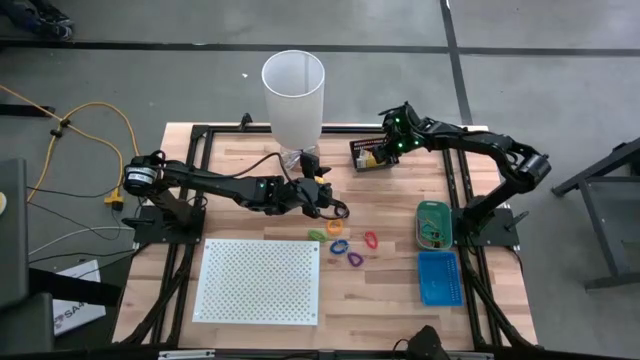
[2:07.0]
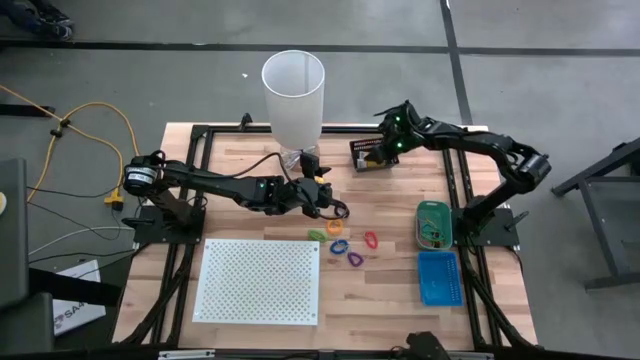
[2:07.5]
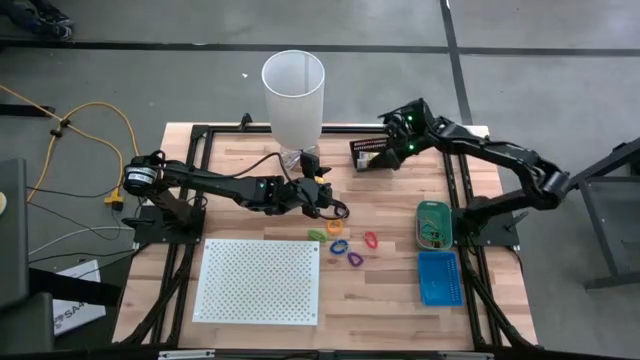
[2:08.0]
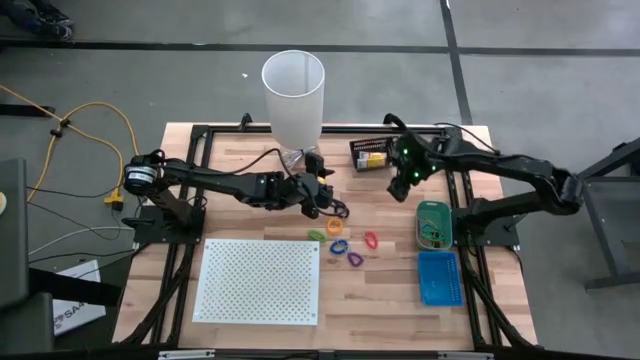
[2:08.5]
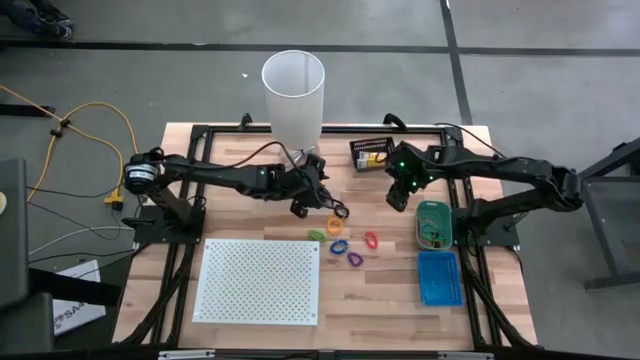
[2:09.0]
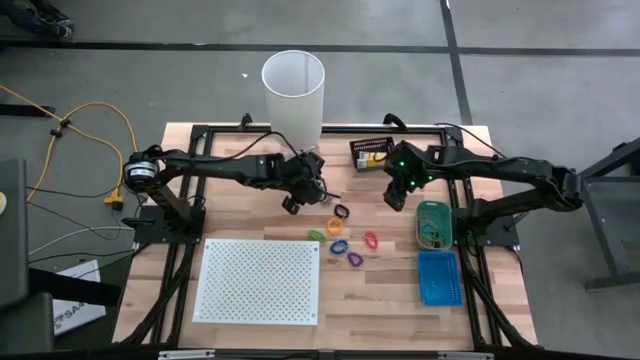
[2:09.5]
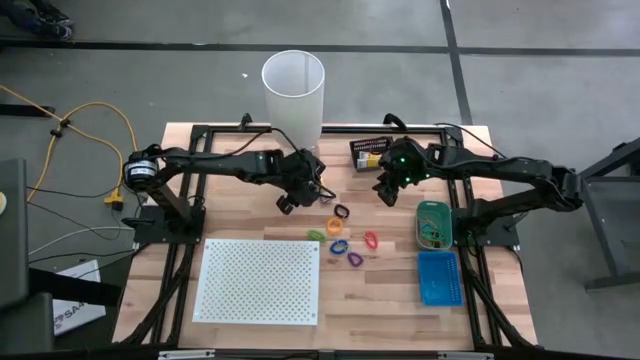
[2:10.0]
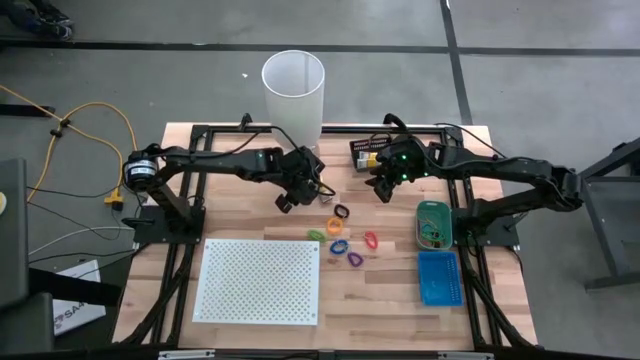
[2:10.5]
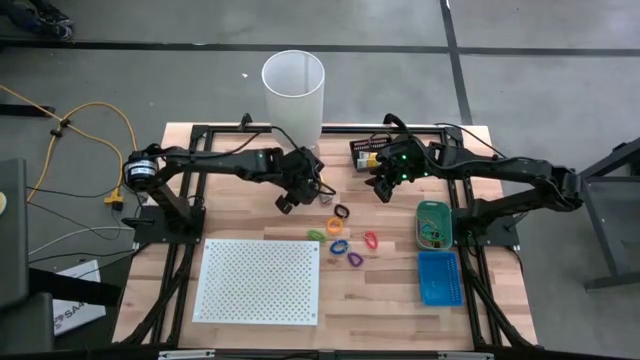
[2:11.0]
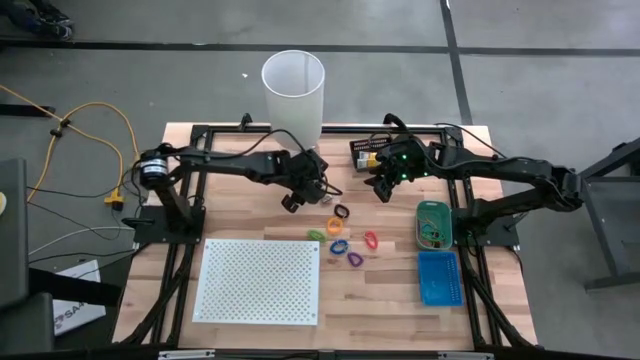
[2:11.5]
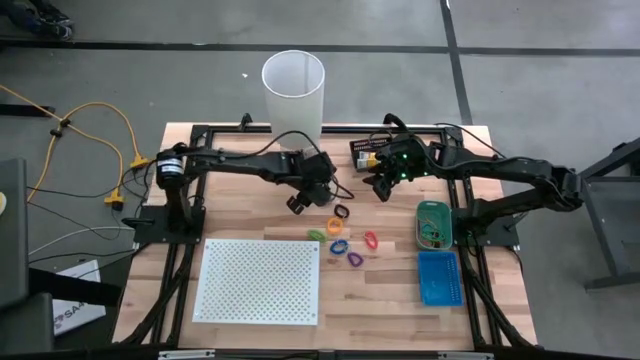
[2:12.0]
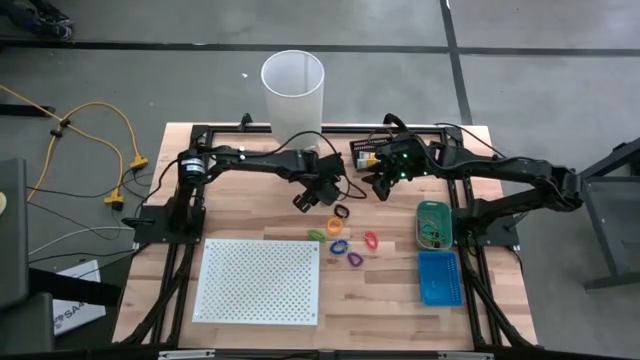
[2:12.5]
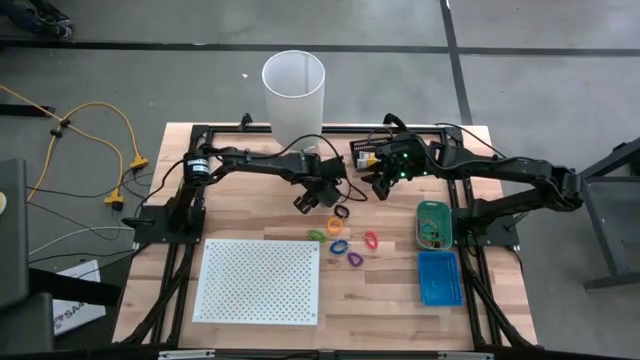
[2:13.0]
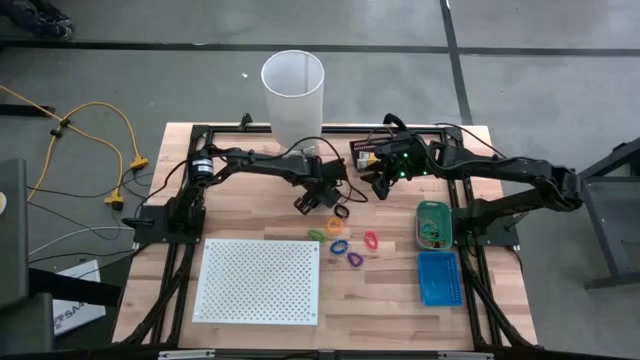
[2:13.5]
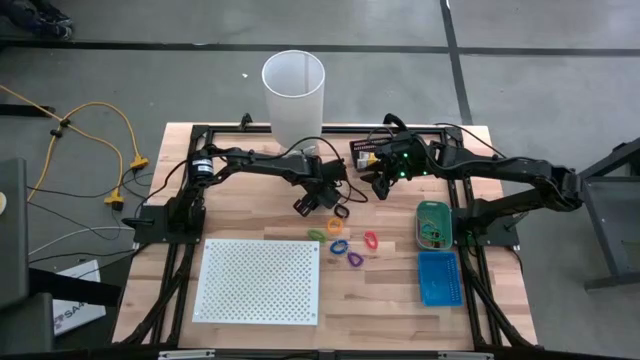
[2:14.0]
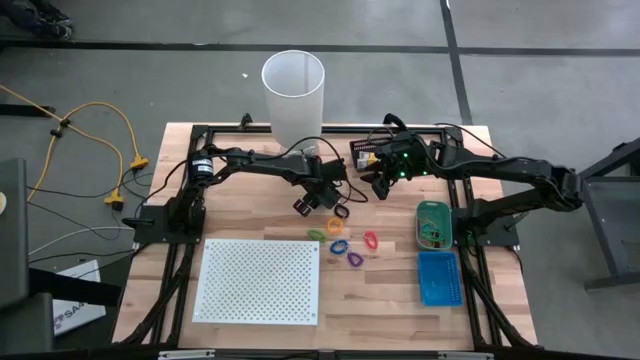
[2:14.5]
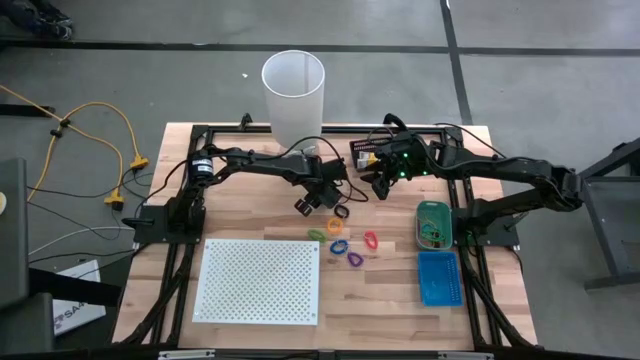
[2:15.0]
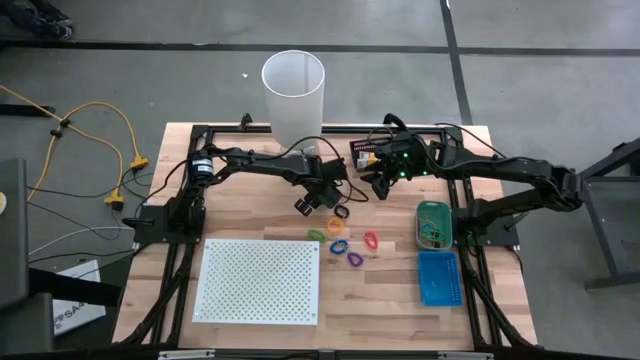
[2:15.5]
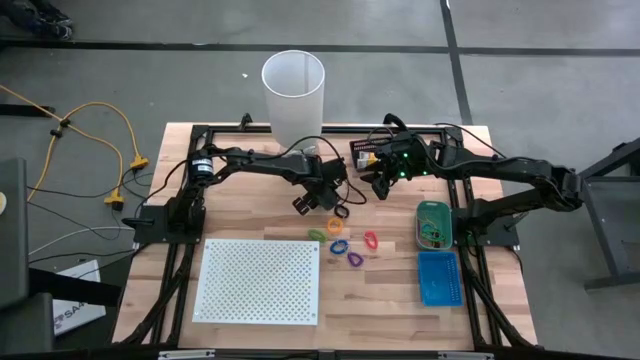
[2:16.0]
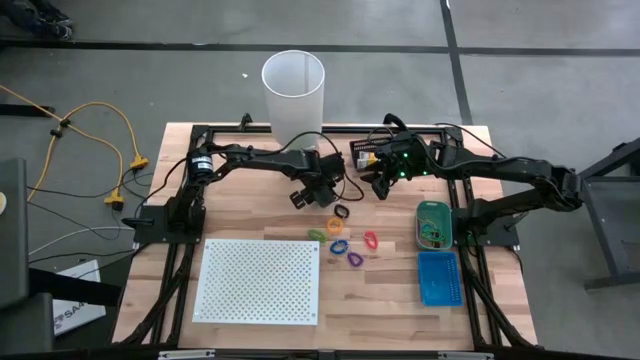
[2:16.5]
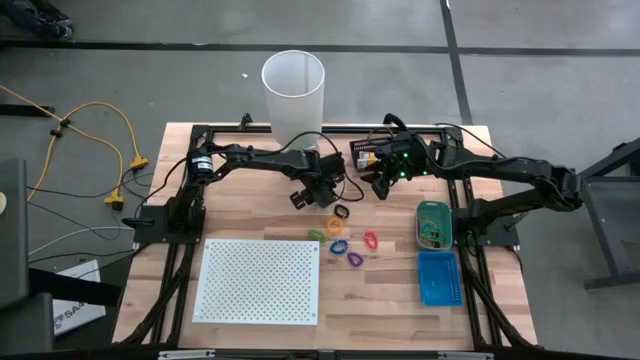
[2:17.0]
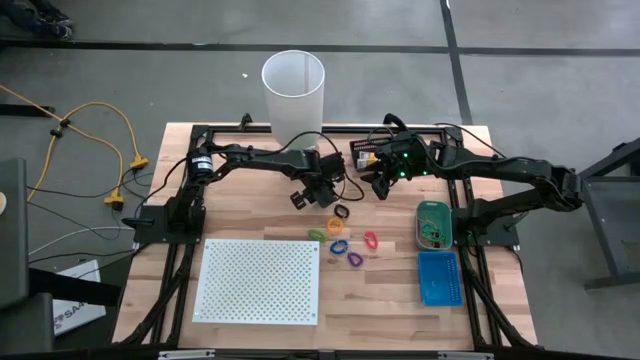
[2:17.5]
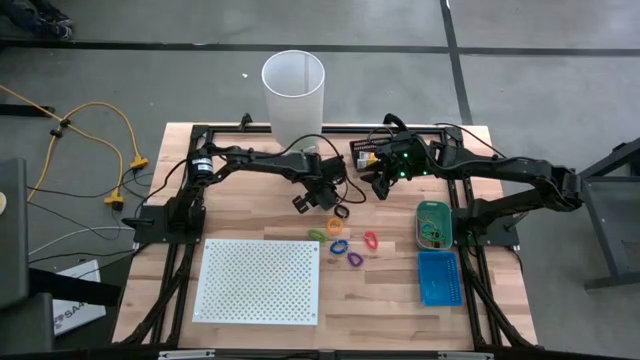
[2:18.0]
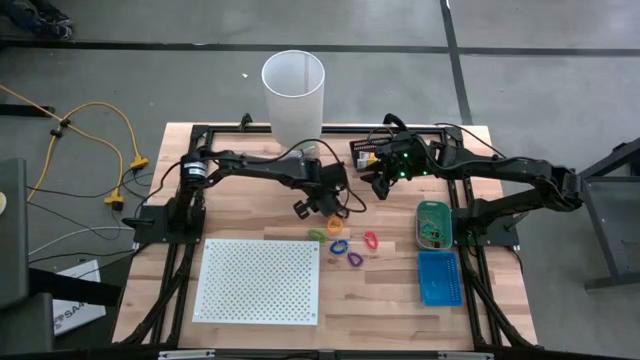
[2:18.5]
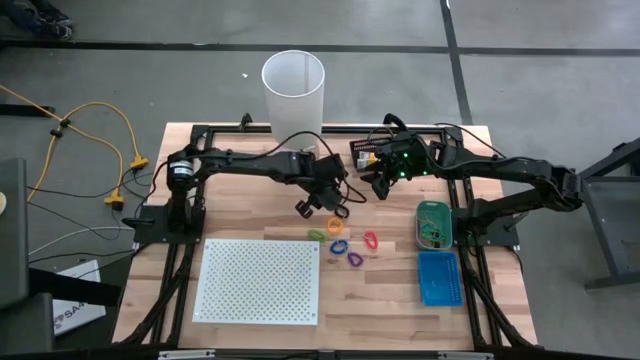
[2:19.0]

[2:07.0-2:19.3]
Task: Pick & Place Office Desk Supplies
Put the yellow crayon box into the black bin

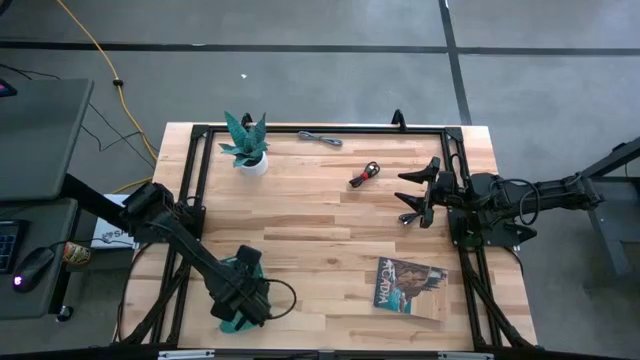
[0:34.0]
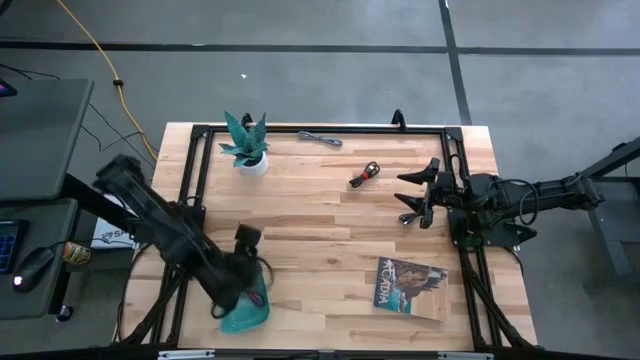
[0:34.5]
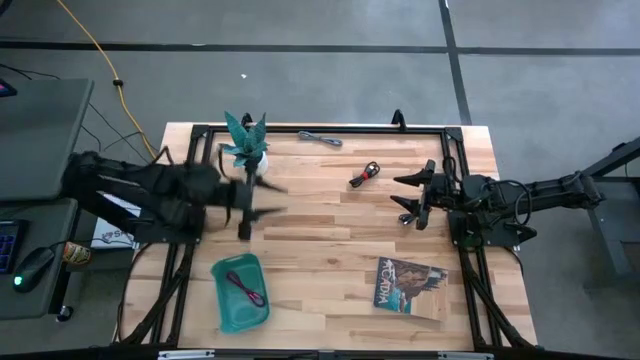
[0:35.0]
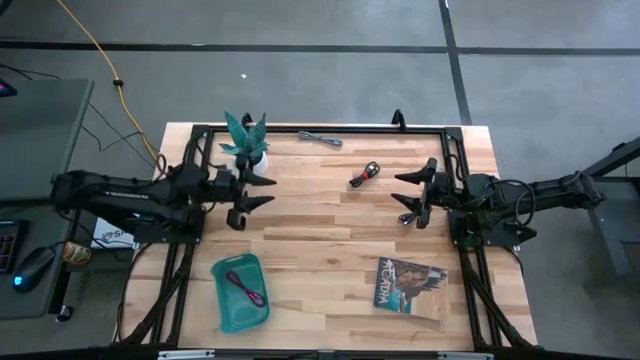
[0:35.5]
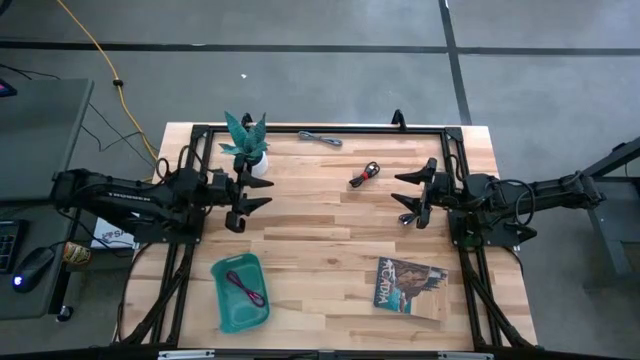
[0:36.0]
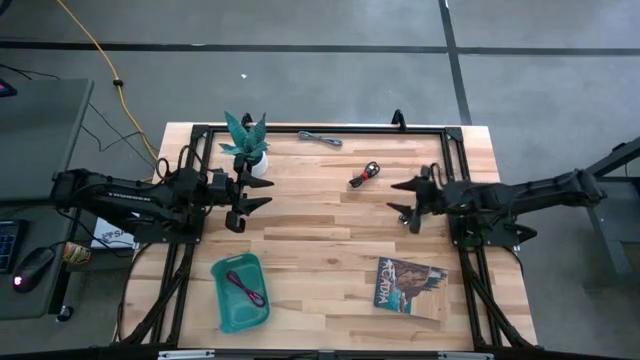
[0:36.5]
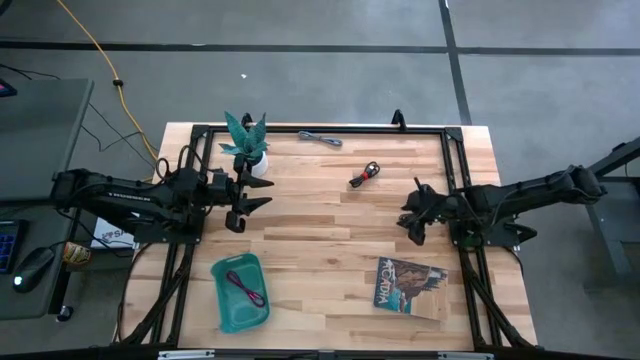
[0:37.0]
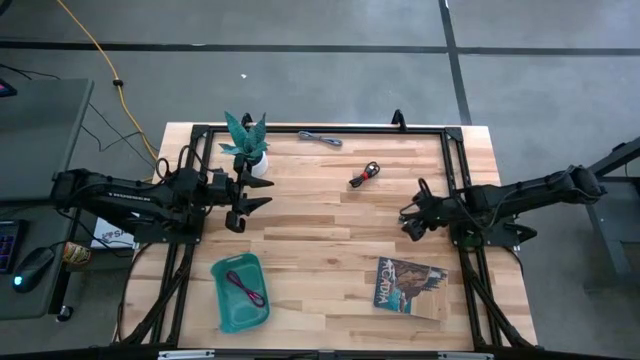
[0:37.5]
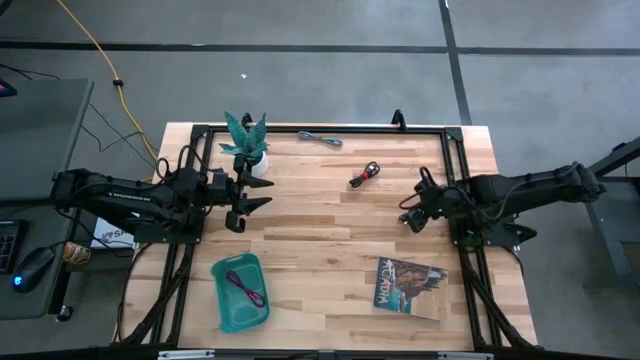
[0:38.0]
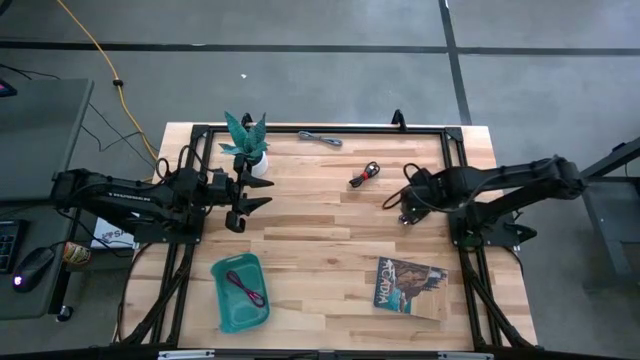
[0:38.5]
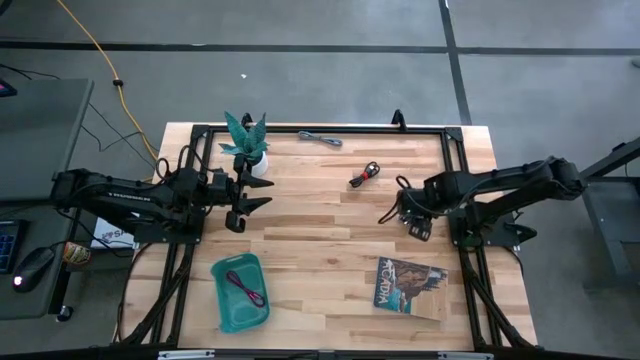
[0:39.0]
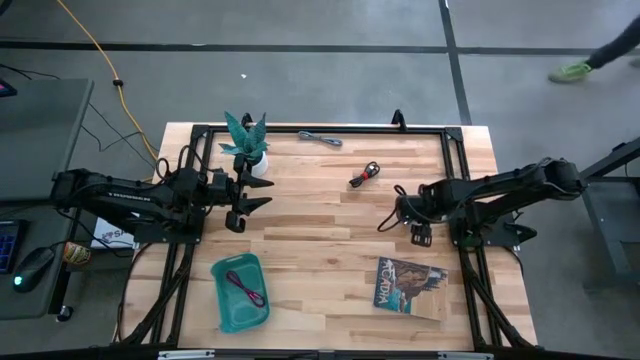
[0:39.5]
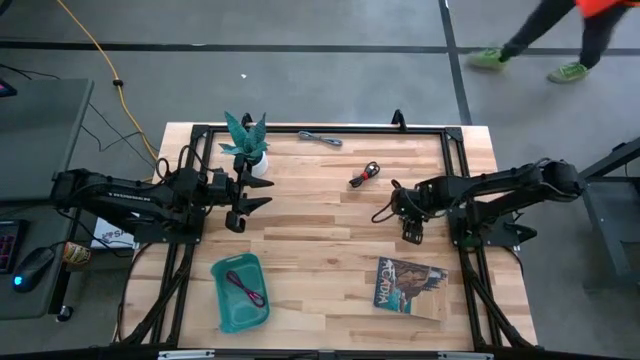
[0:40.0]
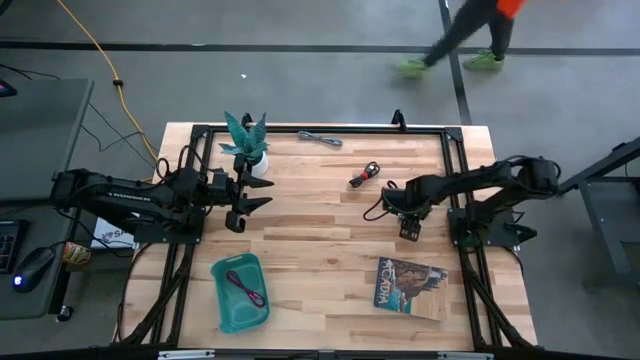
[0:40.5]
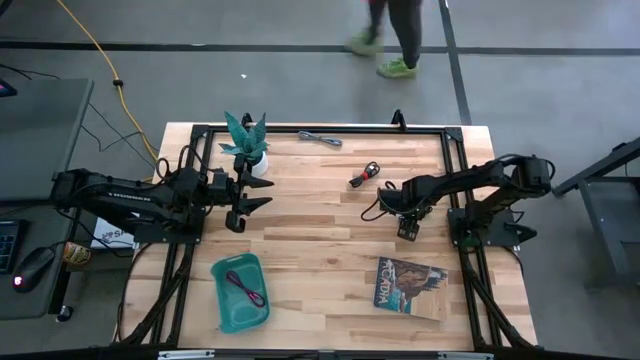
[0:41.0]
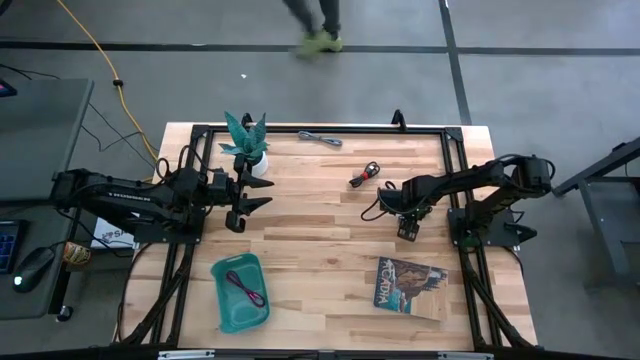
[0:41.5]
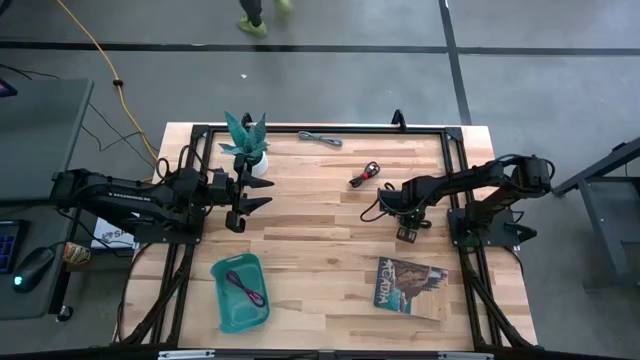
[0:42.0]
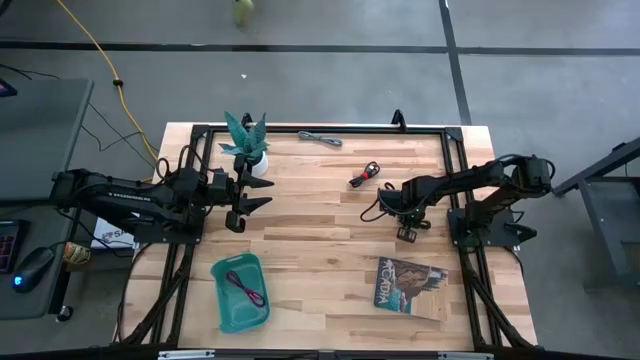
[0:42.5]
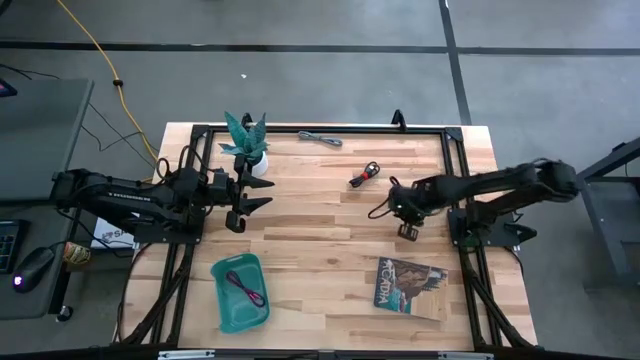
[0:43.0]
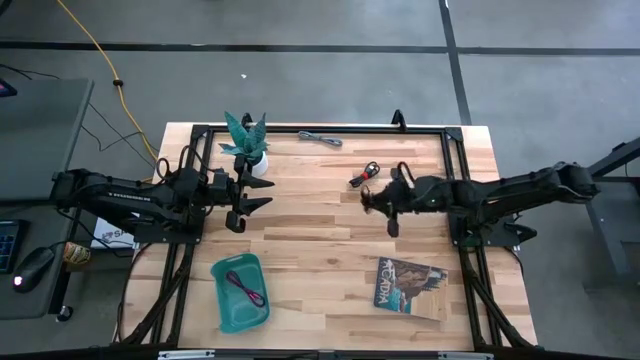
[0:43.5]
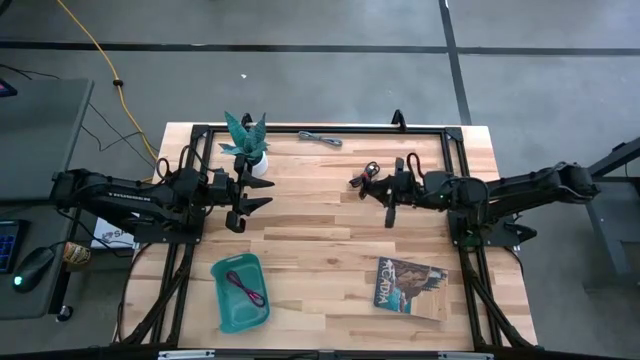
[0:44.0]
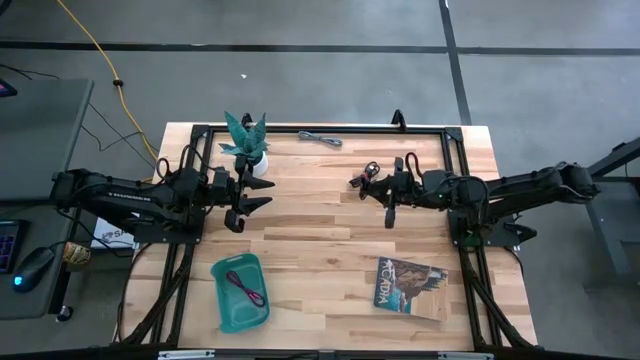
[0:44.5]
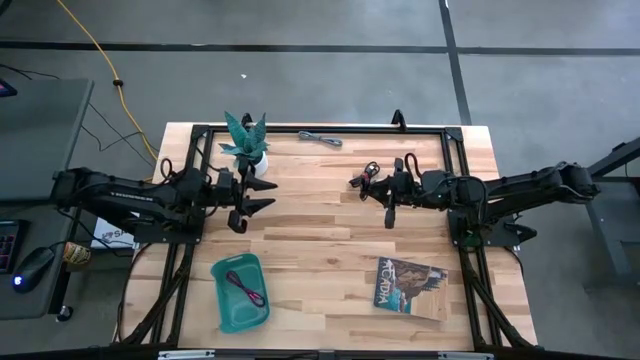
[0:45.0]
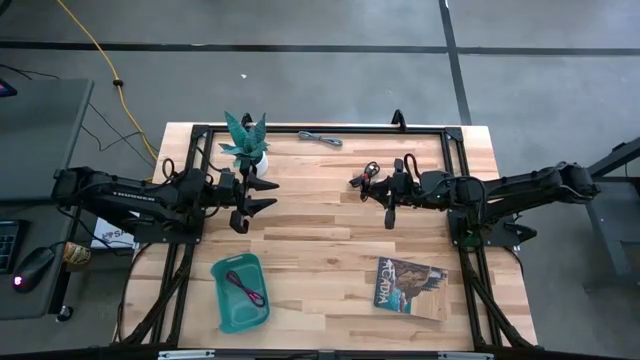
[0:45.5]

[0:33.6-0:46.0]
Task: Pick and place USB-C Cables
Put the right black USB cable into the green bin
